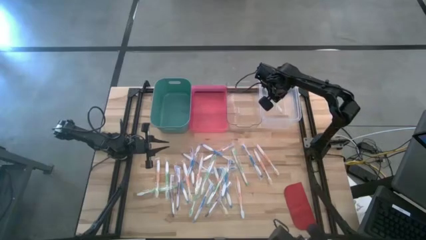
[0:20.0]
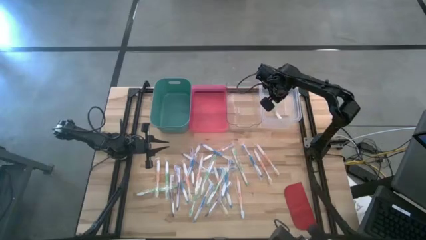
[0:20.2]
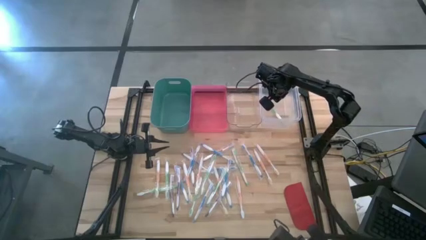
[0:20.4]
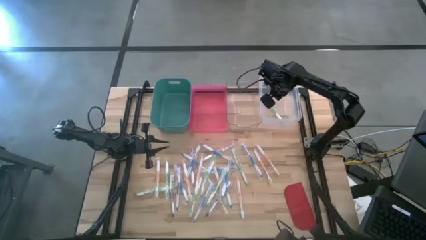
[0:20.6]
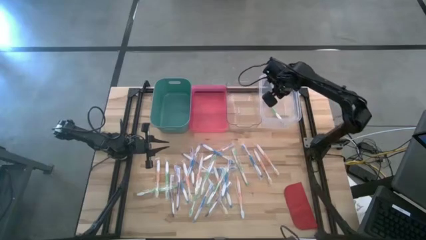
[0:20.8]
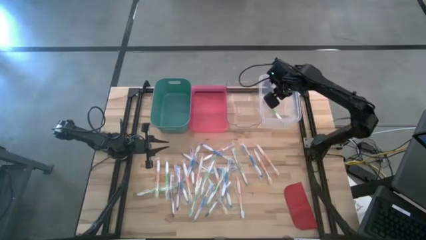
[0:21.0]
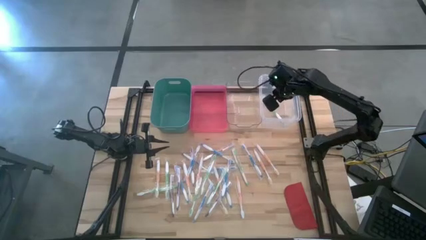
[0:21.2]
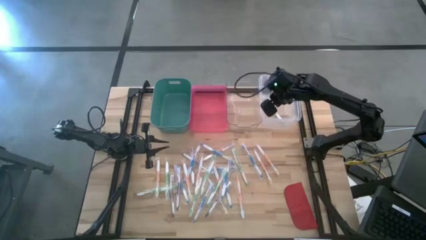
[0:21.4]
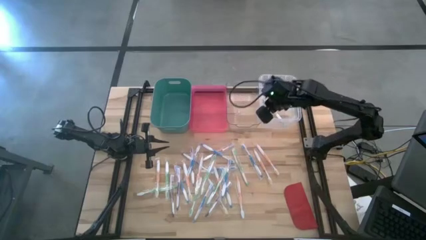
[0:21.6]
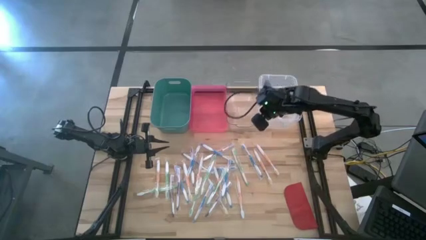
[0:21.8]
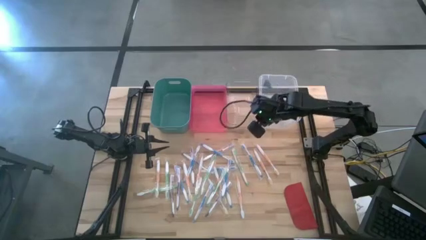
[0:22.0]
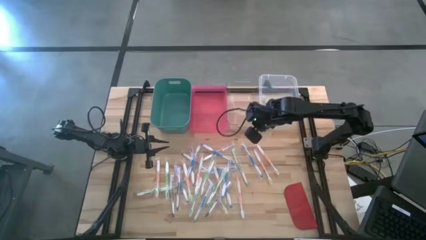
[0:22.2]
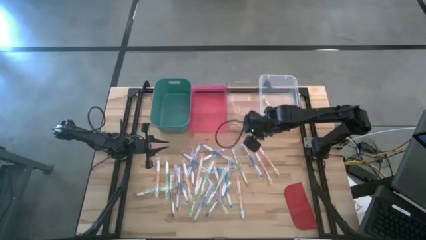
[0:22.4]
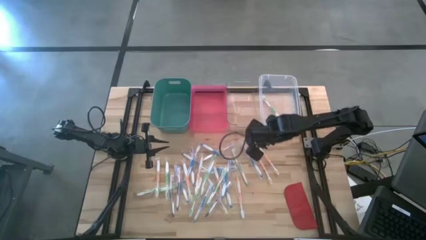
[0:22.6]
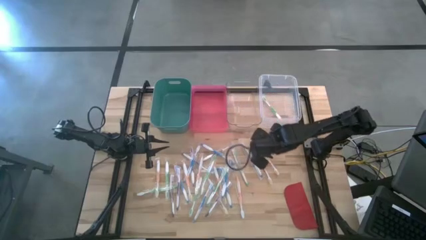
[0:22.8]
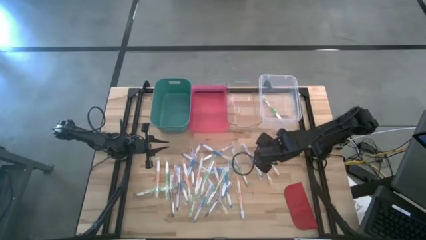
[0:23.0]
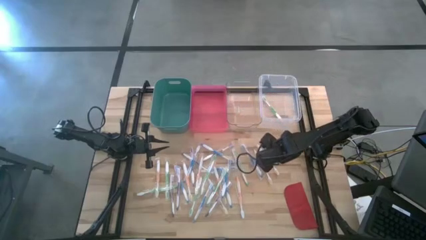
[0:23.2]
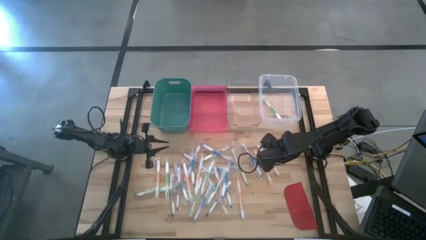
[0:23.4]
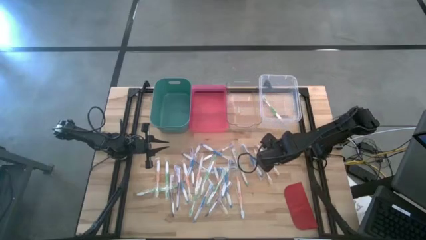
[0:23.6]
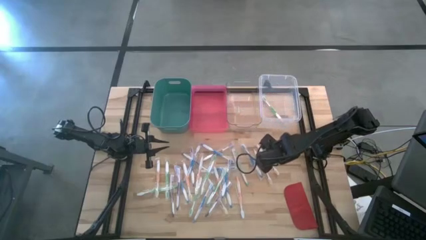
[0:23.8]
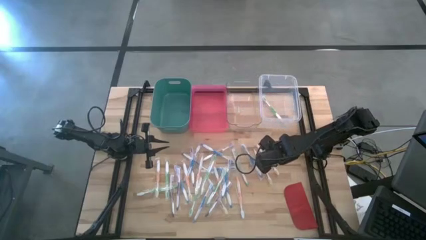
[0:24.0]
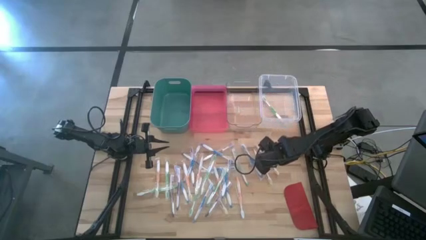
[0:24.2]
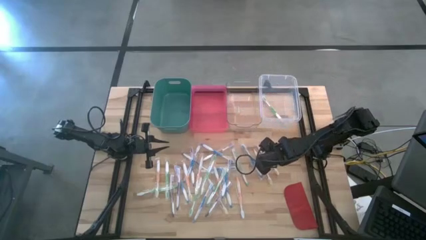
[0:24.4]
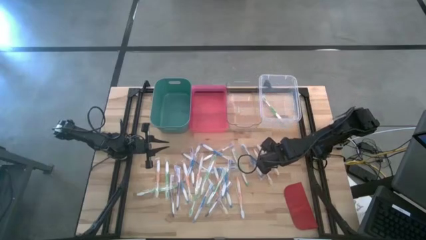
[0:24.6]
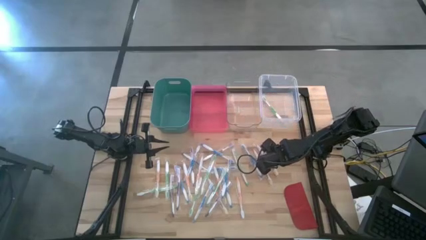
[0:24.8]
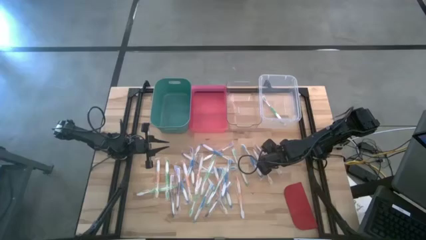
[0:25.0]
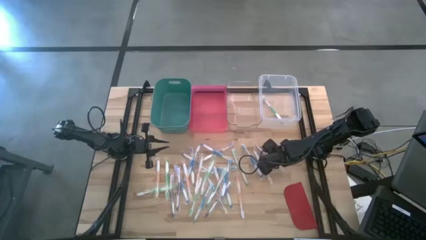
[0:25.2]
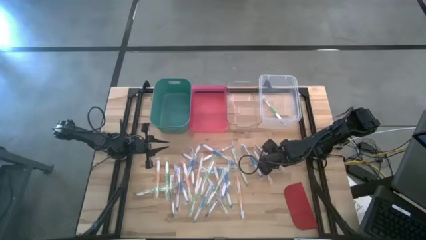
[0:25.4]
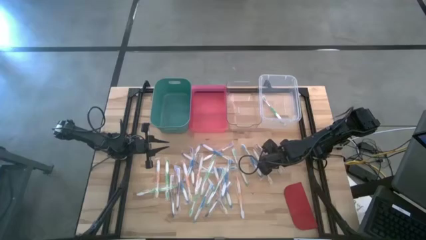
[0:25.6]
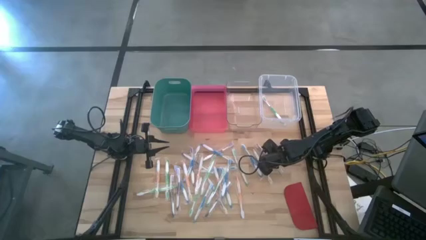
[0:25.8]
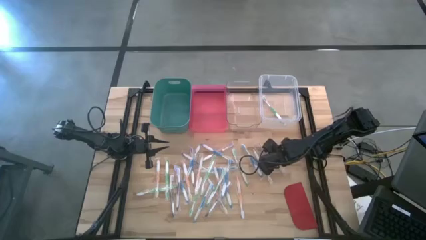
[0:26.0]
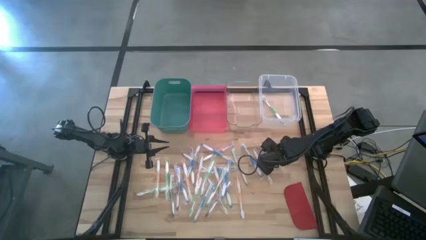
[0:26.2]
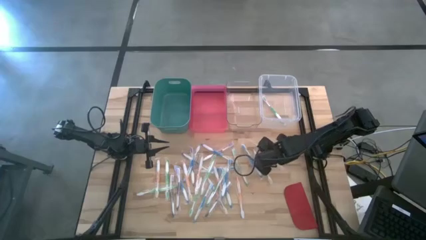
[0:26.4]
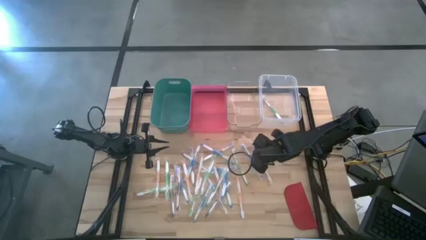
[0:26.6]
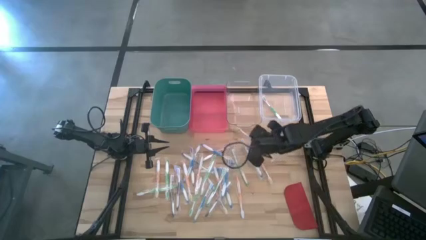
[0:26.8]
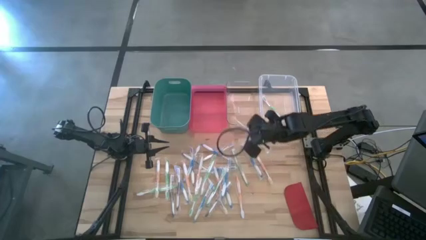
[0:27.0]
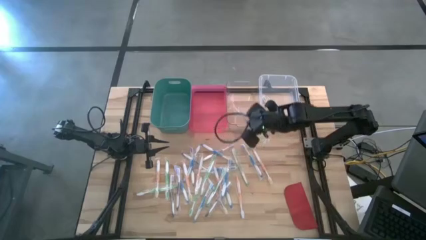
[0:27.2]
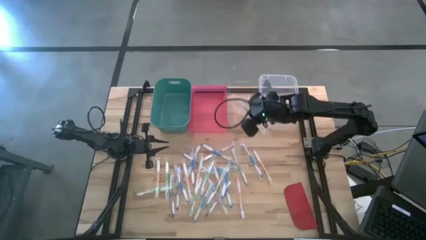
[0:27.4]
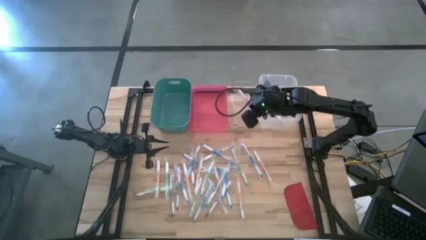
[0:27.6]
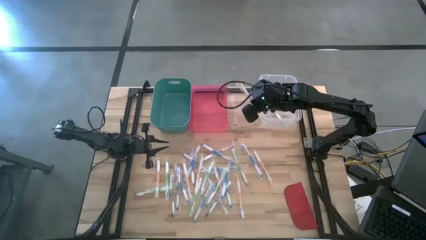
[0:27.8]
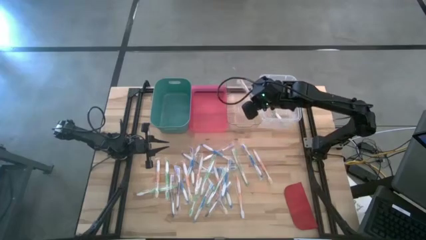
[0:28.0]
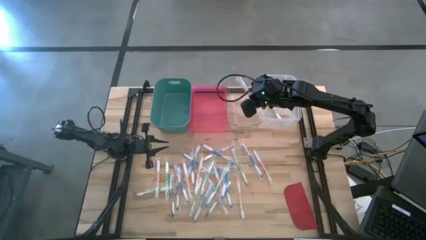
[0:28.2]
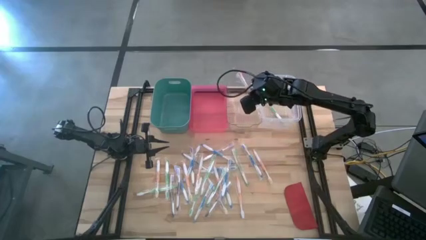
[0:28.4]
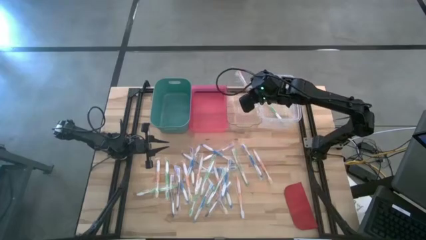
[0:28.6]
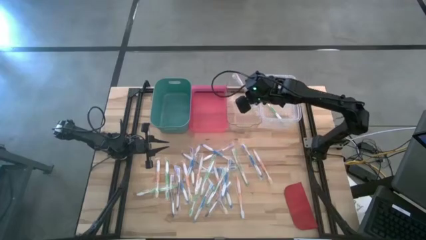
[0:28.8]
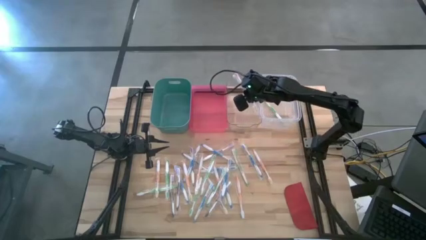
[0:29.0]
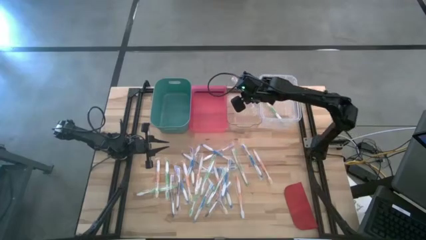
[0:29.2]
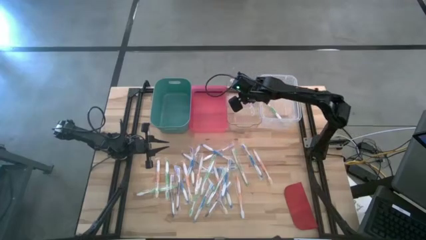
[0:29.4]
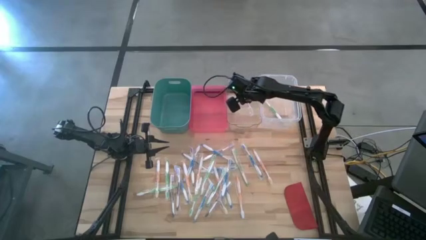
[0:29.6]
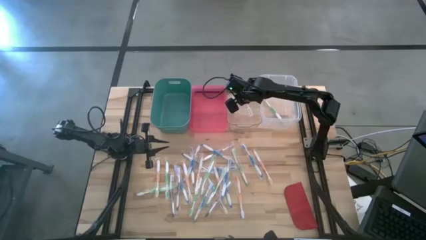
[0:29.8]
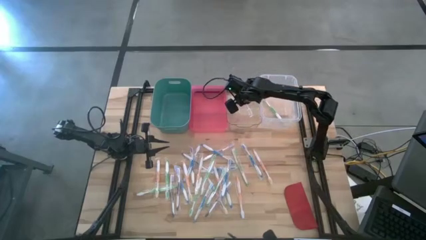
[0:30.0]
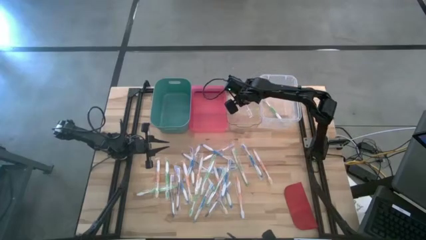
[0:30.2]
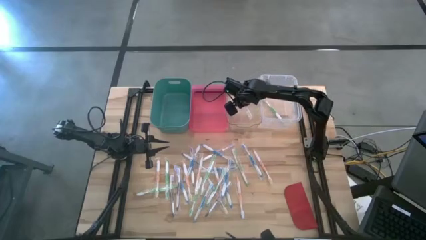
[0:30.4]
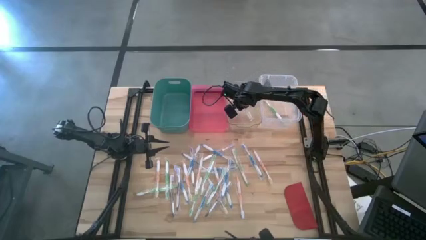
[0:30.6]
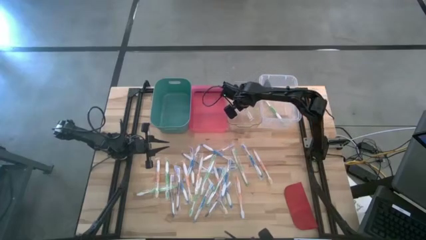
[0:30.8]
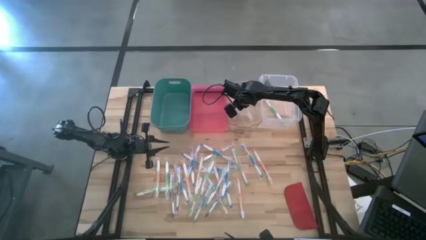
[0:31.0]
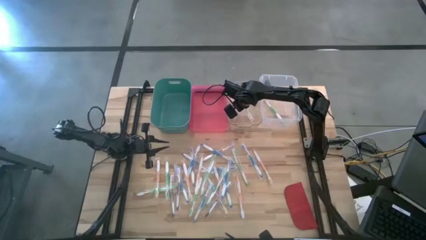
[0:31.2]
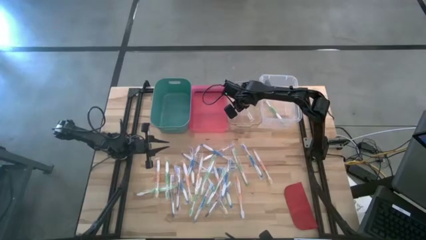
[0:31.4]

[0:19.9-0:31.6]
Task: Pick & Place Toothbrushes
Put the orange toothbrush into the transparent bin
